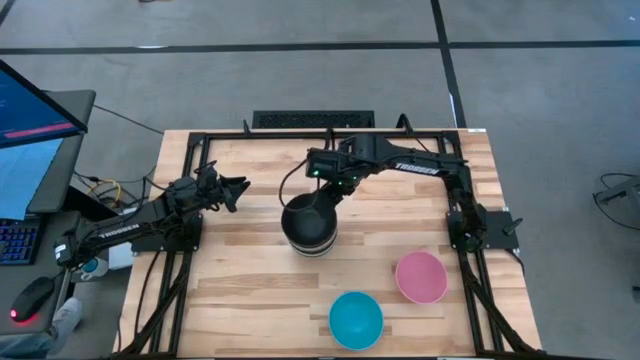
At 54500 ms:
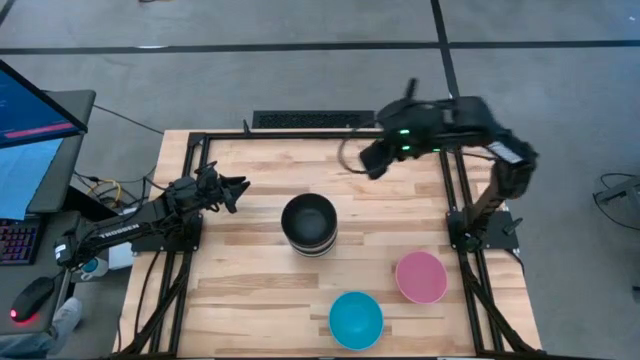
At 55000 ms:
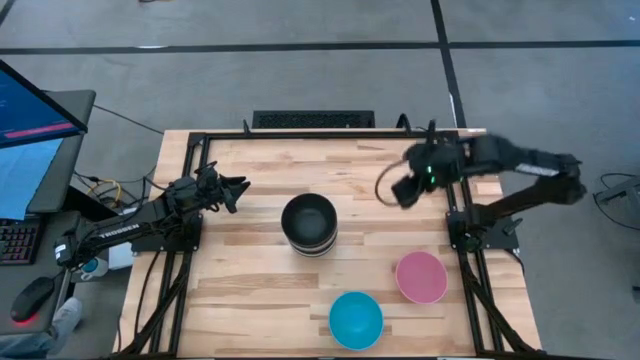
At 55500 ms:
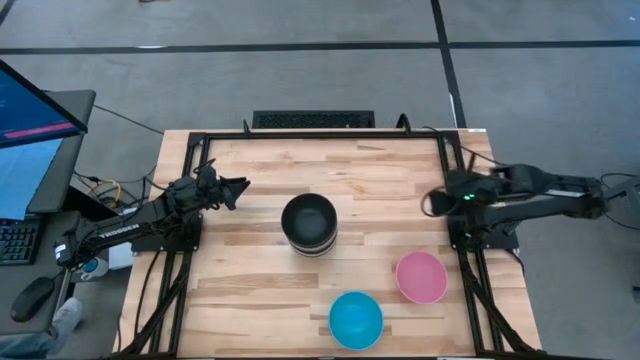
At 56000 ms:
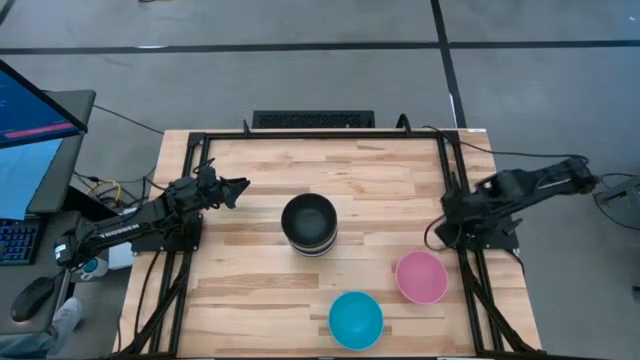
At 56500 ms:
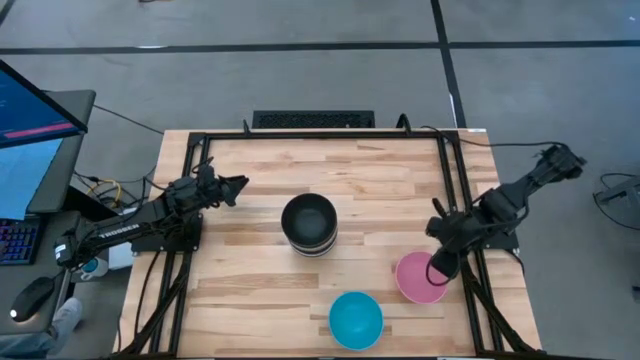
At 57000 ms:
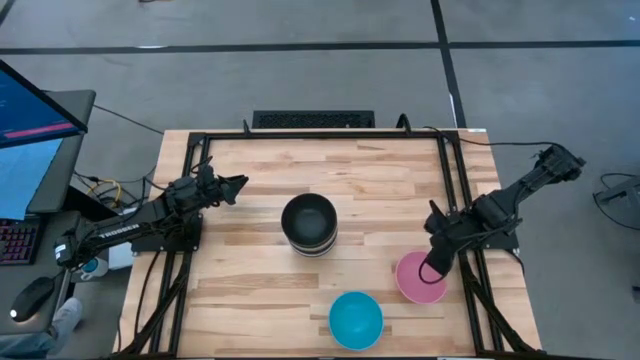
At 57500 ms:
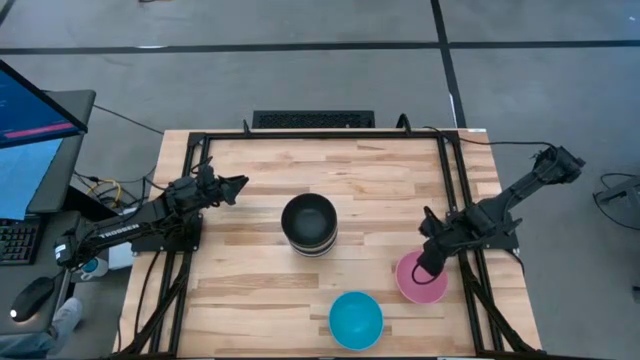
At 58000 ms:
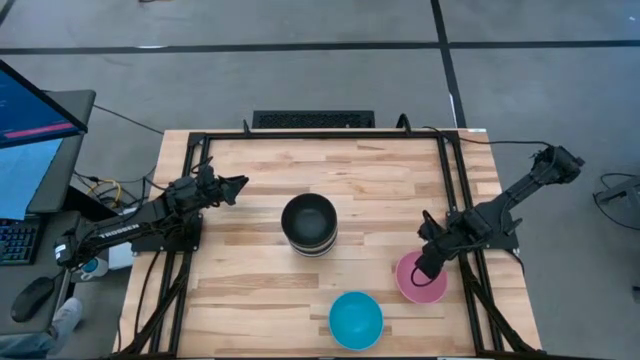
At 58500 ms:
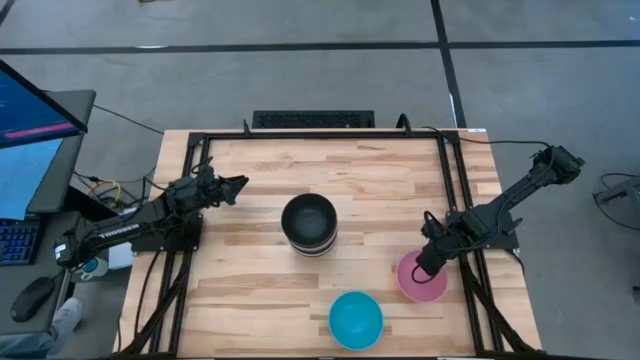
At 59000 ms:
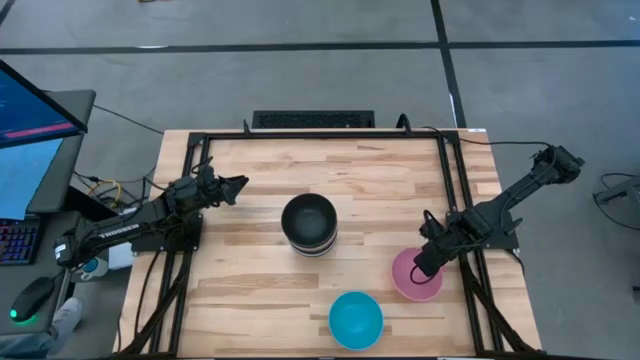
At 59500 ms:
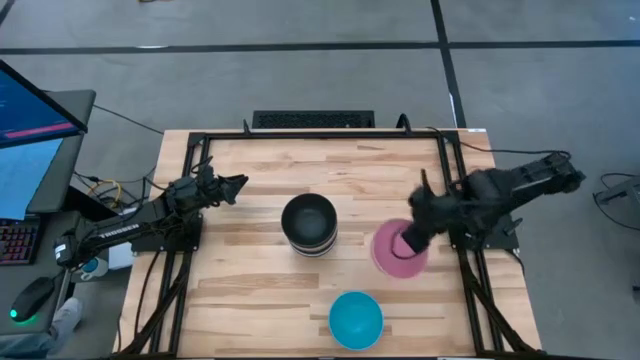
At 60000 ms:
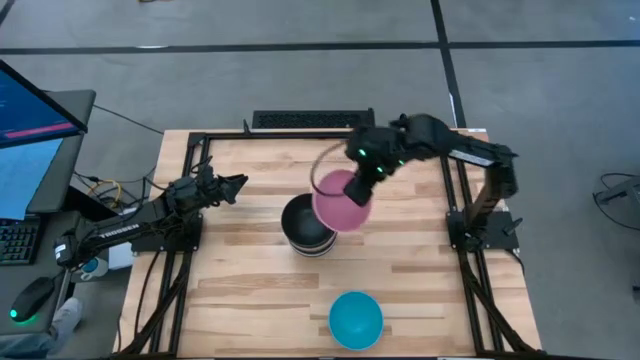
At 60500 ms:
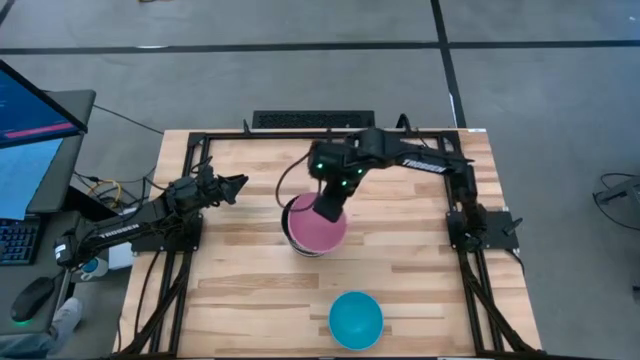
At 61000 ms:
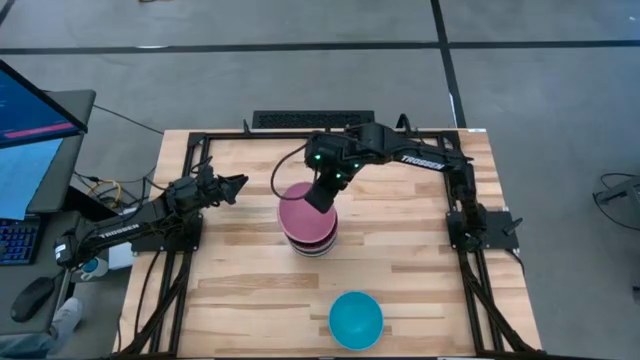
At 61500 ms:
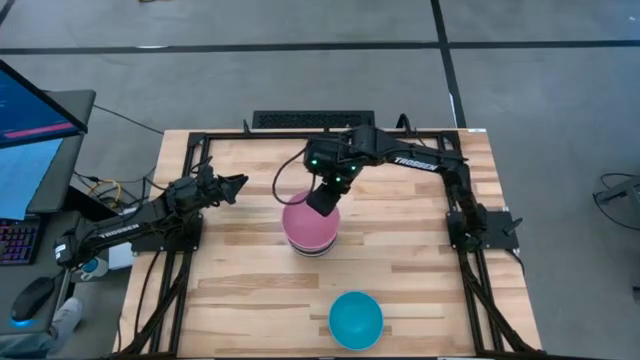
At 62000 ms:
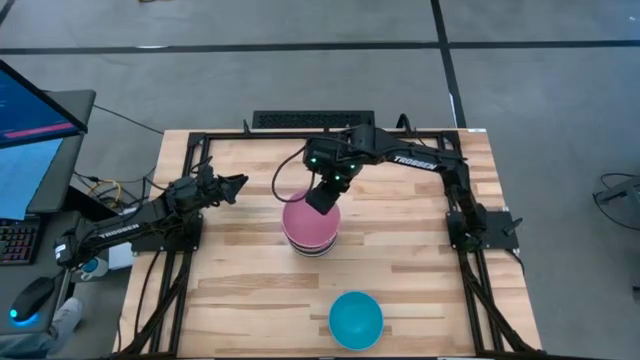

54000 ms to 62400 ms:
Task: Nest bowls inside each other
Stack the pink bowl on top of the black bowl

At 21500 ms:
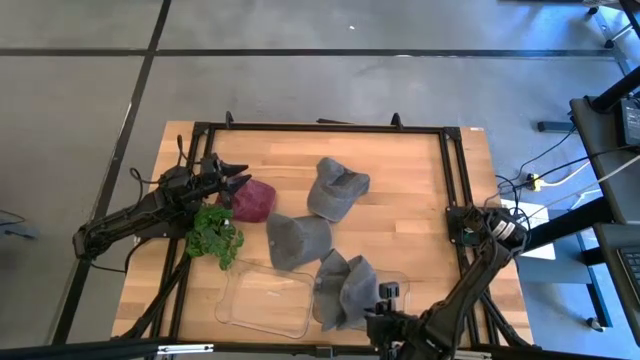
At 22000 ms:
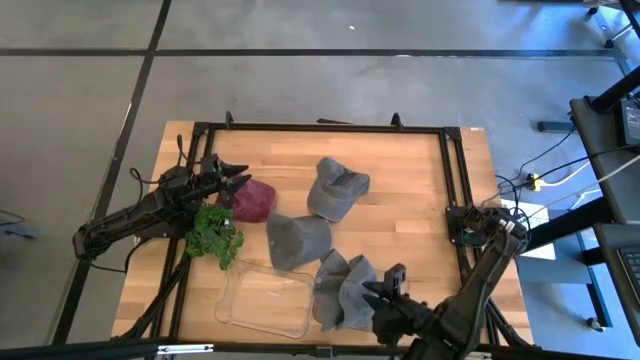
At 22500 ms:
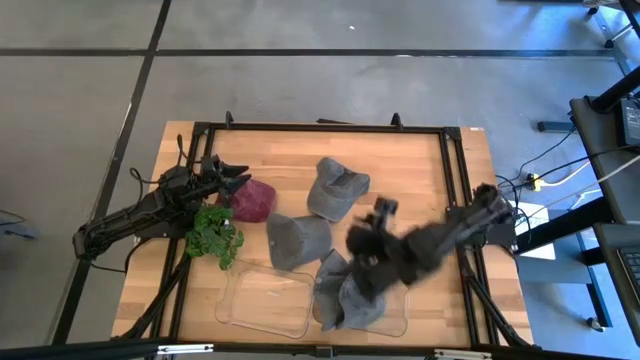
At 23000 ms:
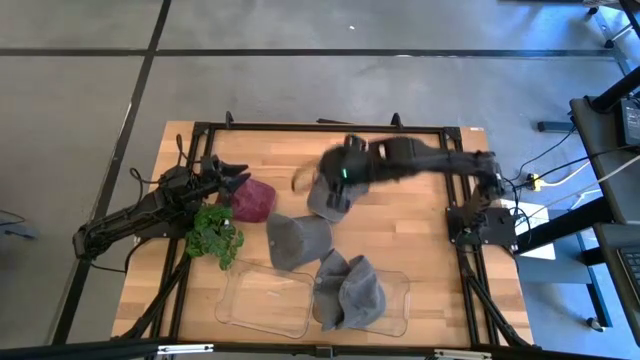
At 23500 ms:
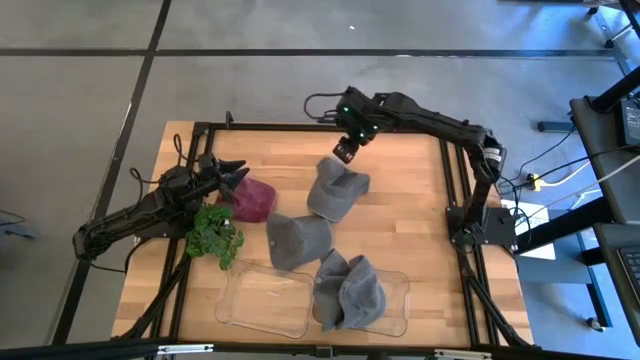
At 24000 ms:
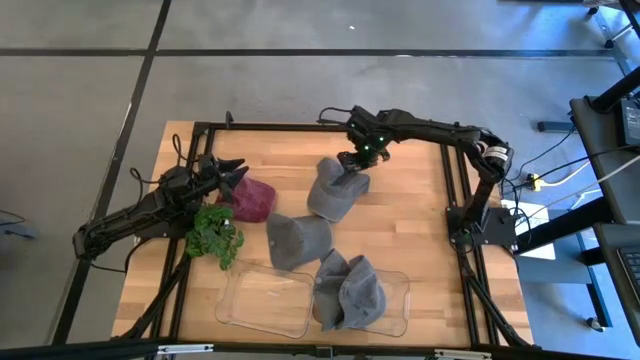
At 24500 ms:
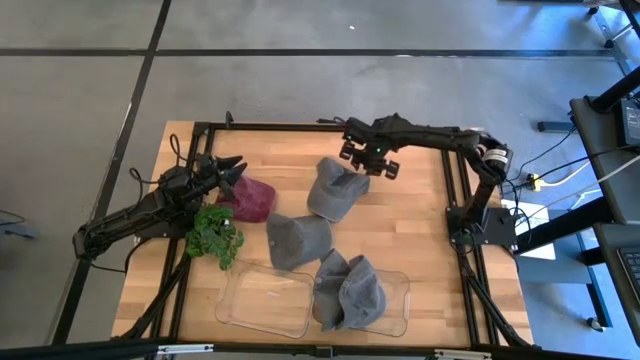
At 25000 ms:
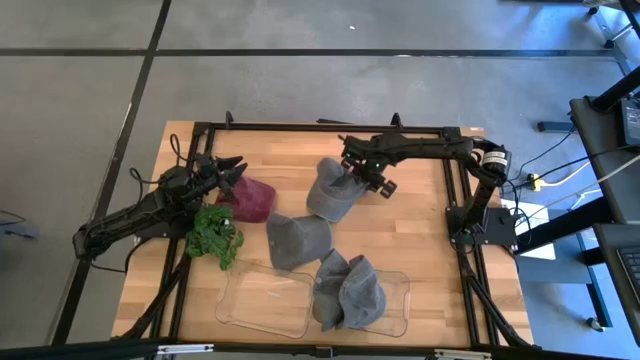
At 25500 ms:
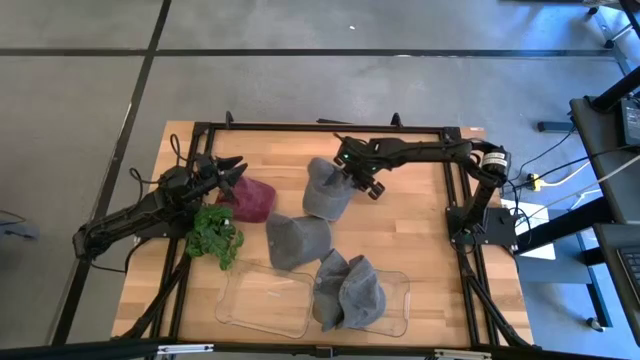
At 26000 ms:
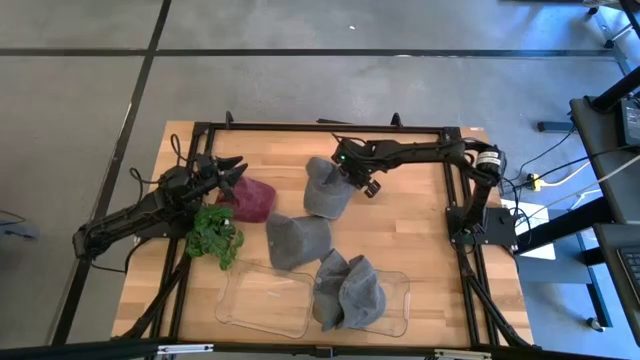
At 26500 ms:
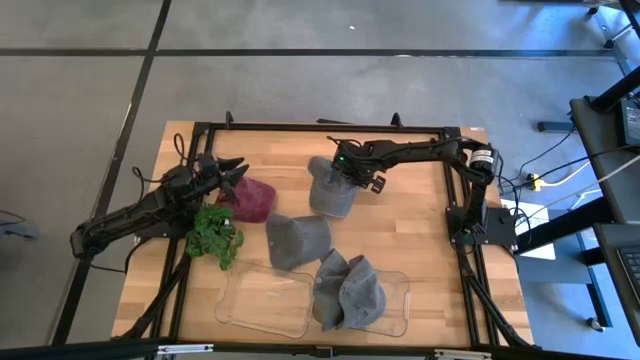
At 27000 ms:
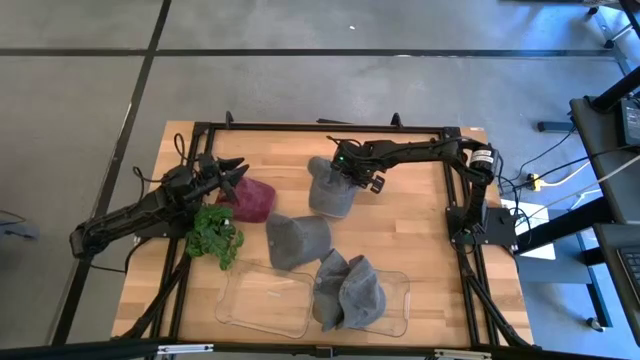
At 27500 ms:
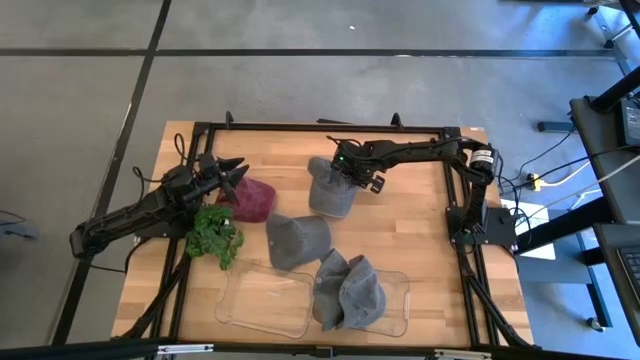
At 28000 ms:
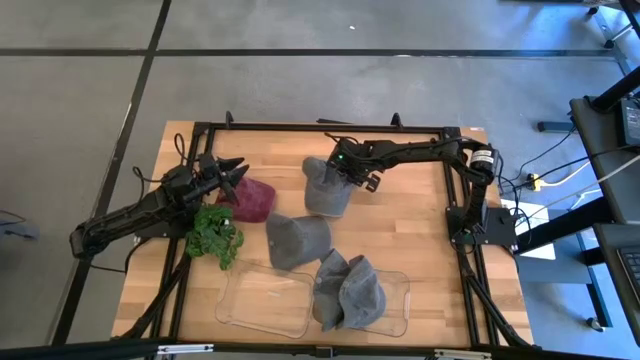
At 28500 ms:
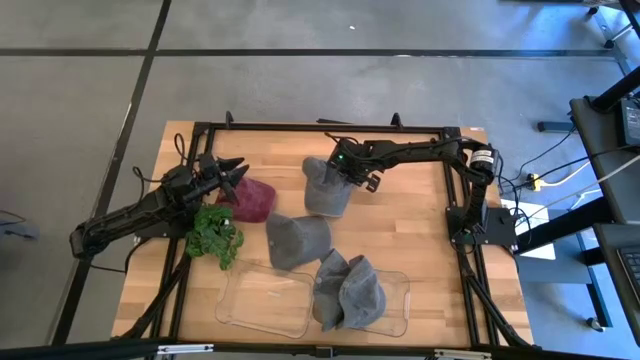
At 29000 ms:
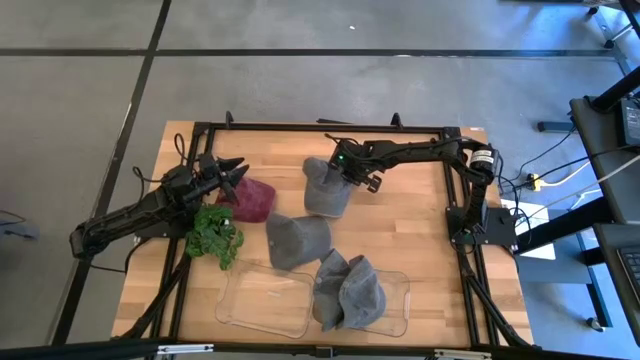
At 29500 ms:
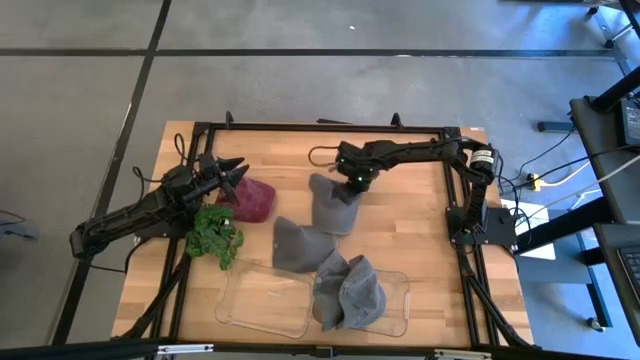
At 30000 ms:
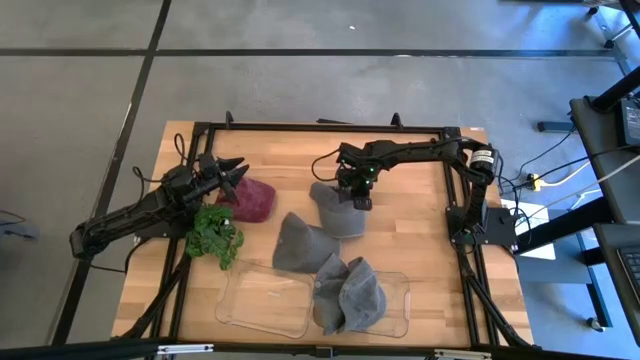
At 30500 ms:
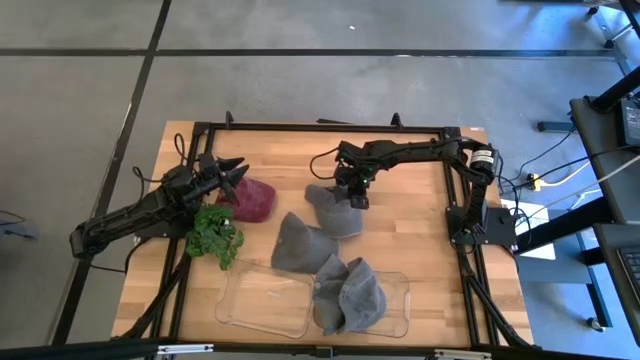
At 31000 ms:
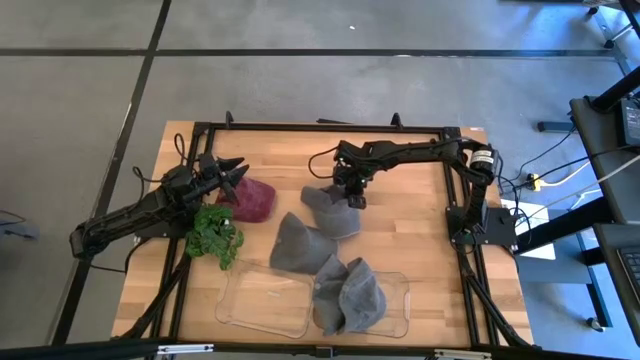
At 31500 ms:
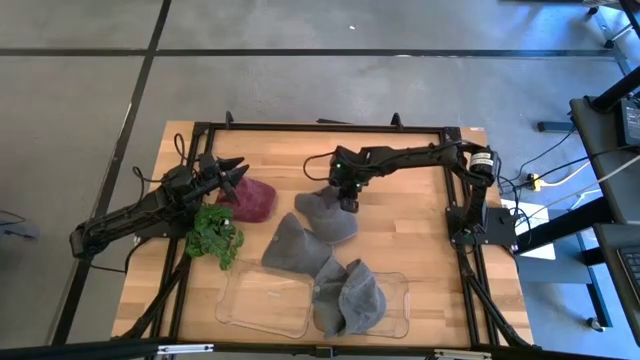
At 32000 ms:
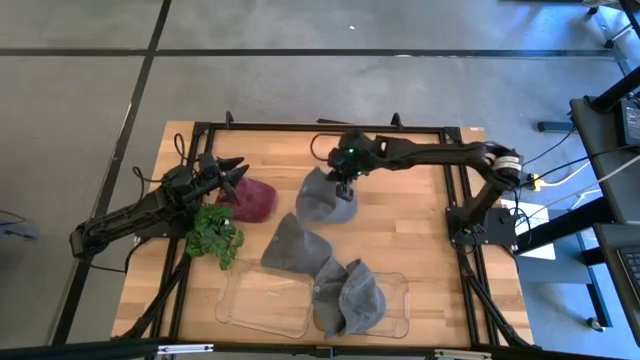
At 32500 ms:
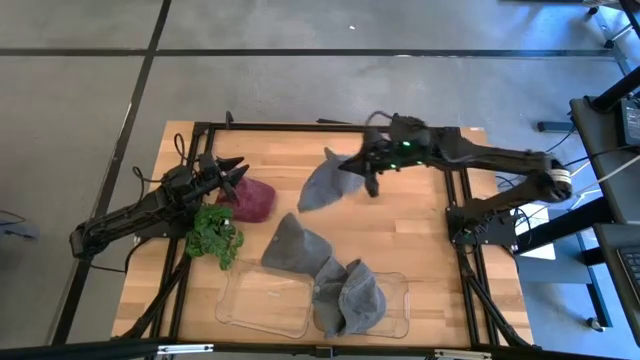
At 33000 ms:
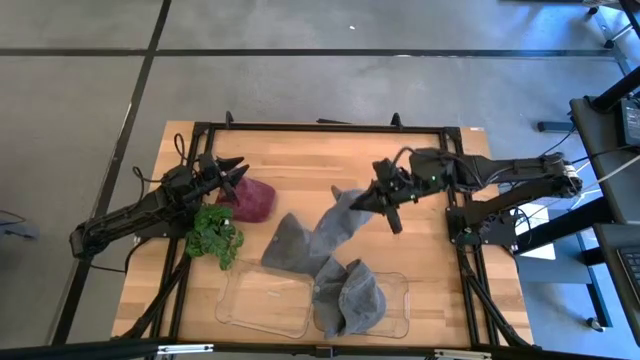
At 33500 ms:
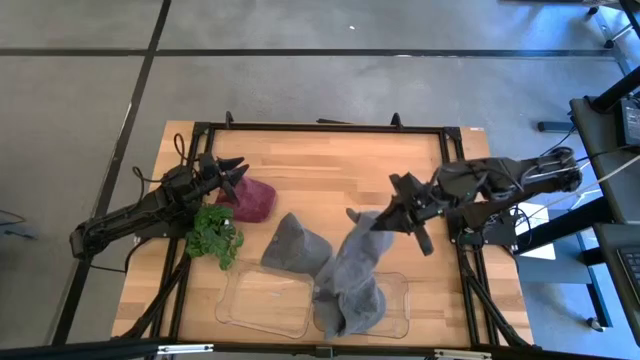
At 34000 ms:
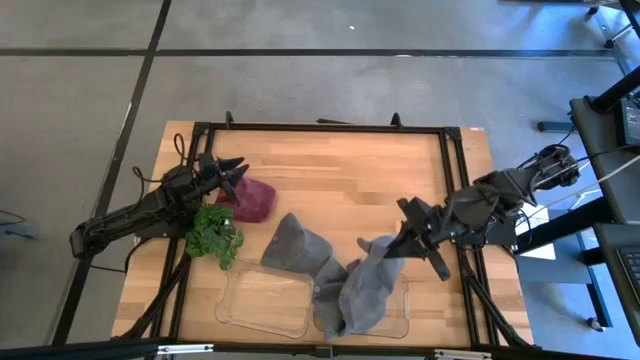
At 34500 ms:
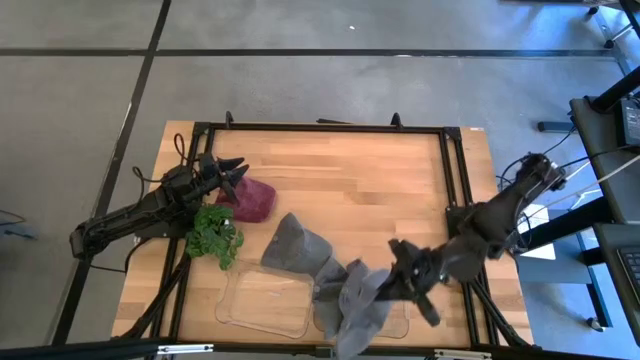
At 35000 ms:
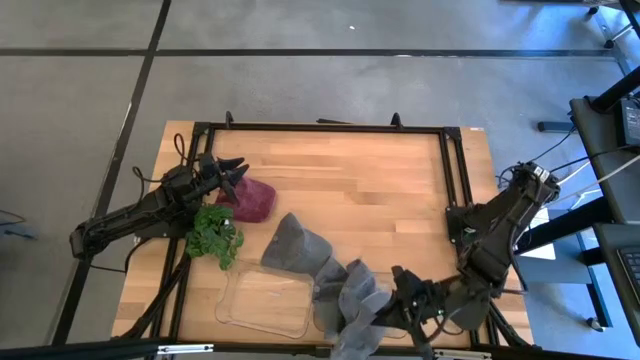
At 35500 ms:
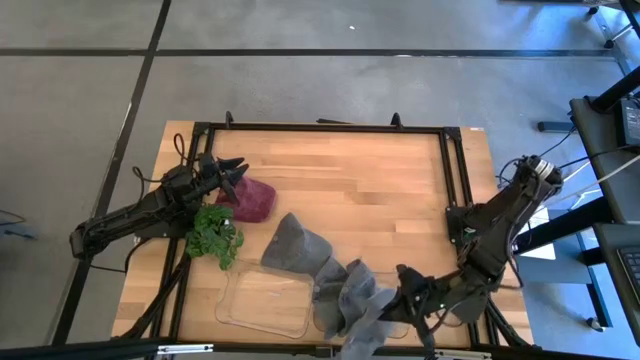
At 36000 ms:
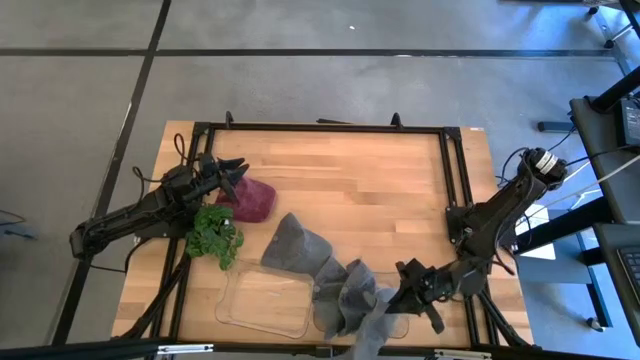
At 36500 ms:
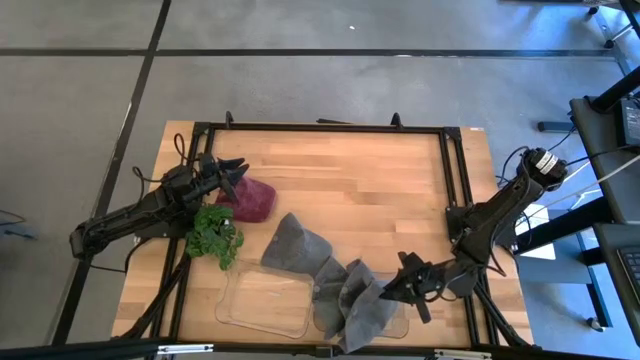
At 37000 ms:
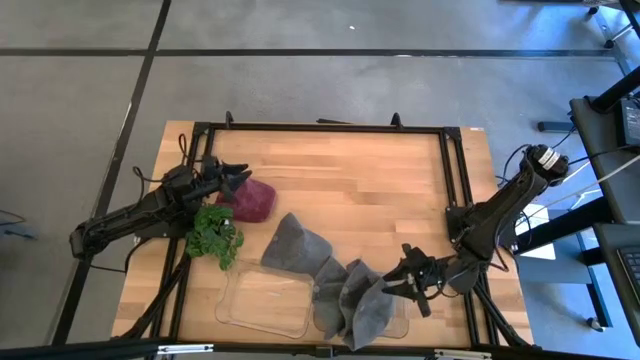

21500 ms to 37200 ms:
Task: Pick & Place hat
Put the gray cap into the right transparent bin
